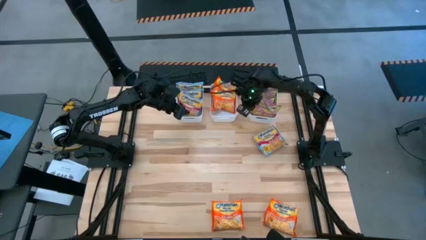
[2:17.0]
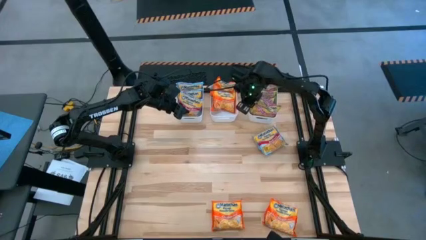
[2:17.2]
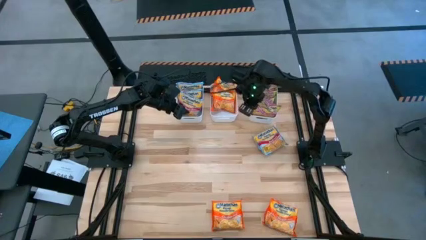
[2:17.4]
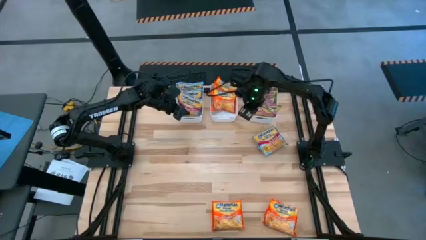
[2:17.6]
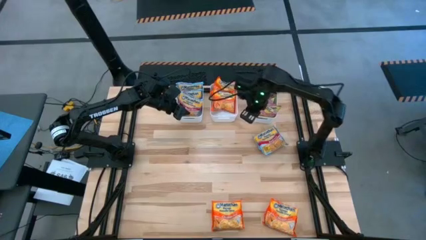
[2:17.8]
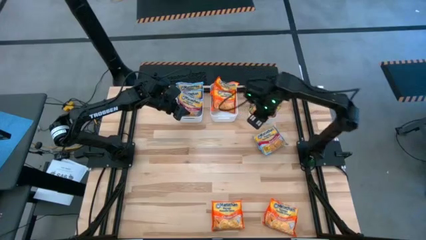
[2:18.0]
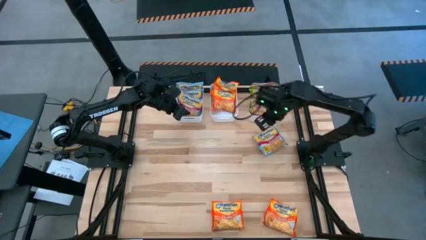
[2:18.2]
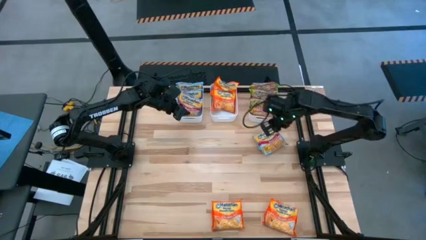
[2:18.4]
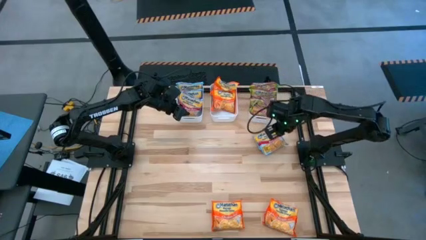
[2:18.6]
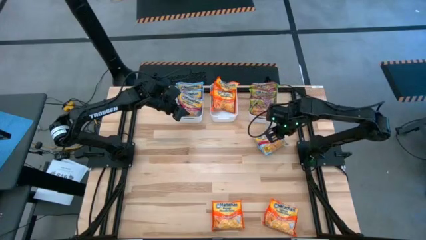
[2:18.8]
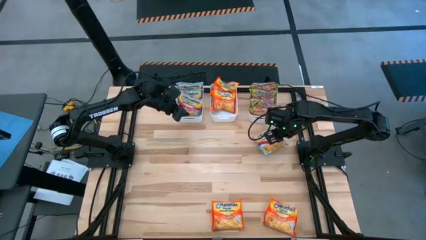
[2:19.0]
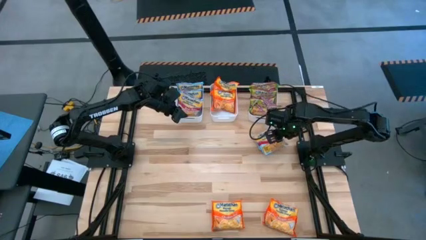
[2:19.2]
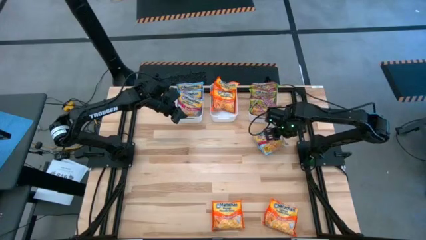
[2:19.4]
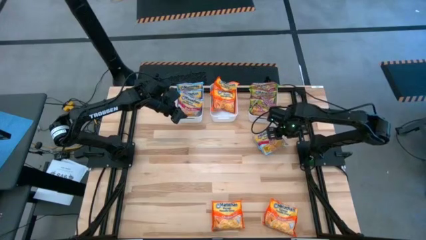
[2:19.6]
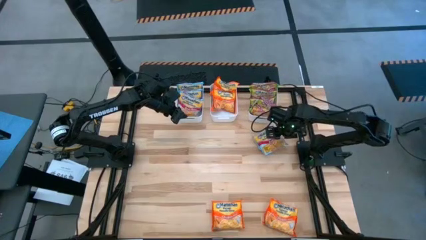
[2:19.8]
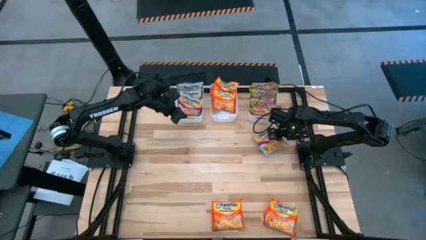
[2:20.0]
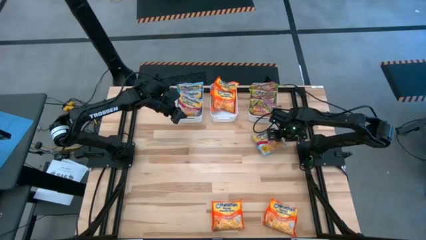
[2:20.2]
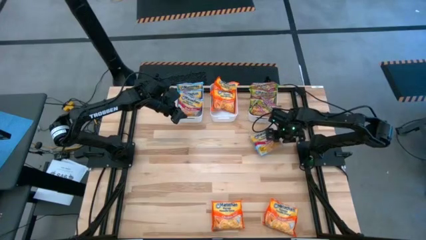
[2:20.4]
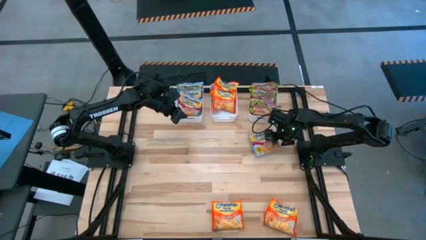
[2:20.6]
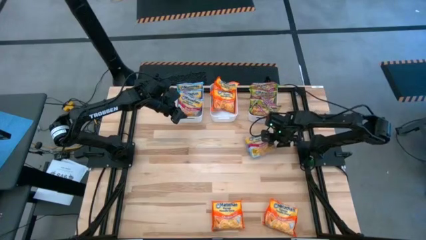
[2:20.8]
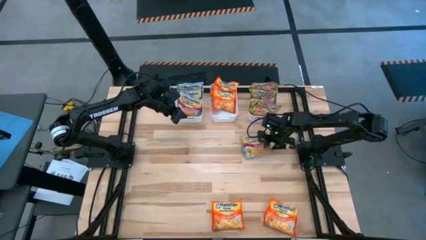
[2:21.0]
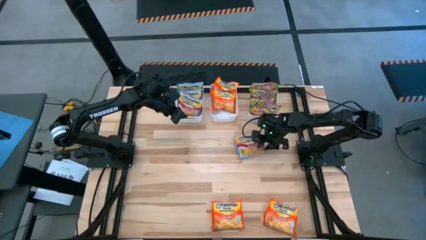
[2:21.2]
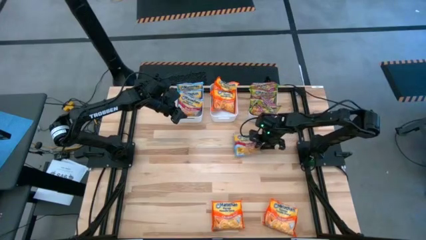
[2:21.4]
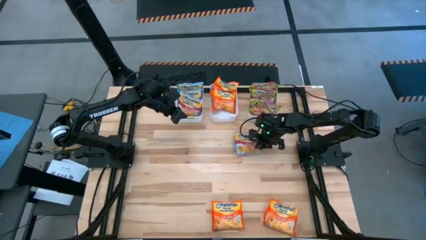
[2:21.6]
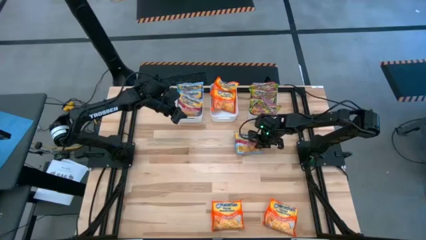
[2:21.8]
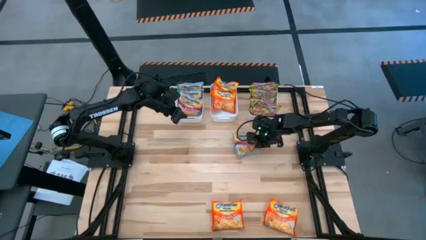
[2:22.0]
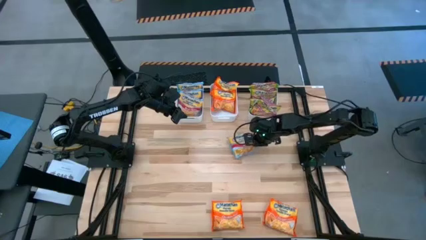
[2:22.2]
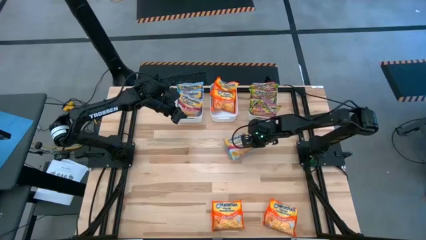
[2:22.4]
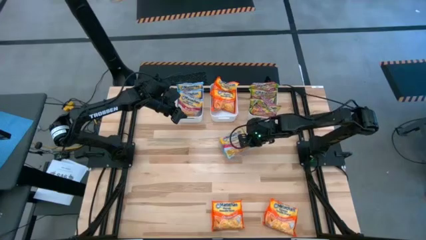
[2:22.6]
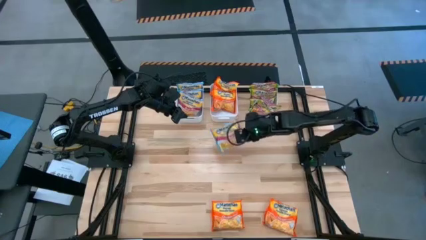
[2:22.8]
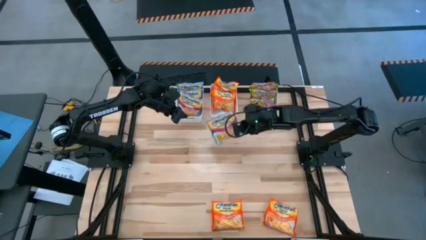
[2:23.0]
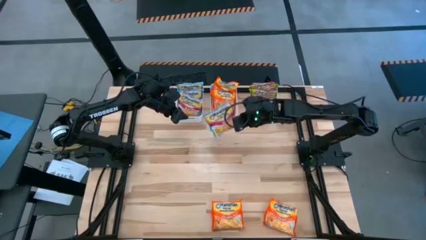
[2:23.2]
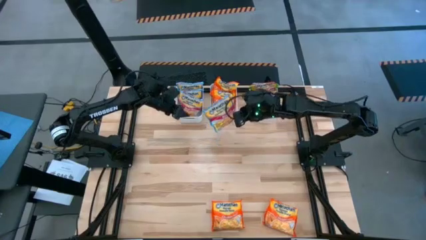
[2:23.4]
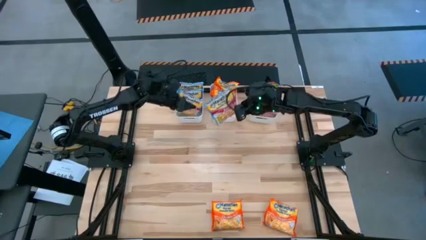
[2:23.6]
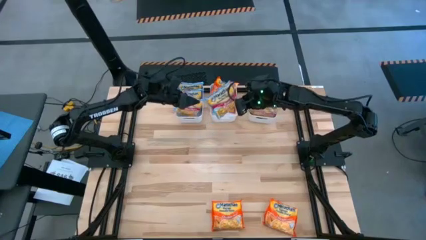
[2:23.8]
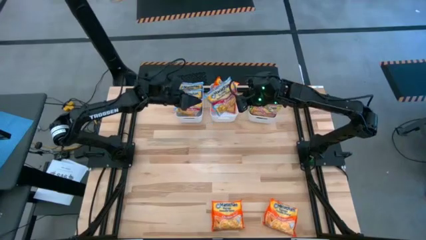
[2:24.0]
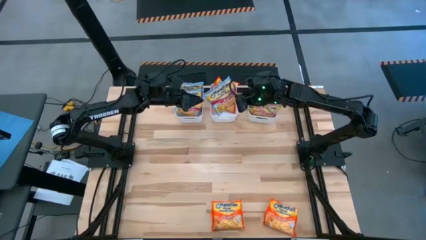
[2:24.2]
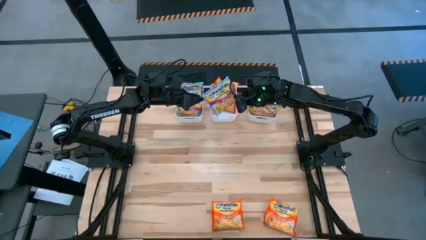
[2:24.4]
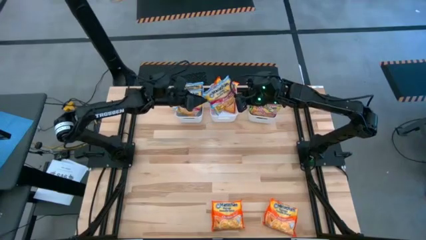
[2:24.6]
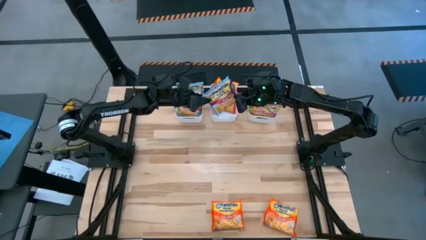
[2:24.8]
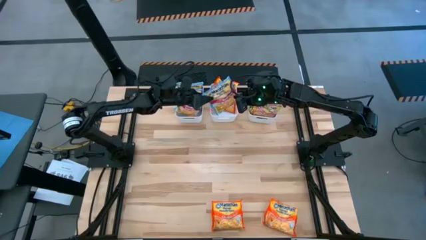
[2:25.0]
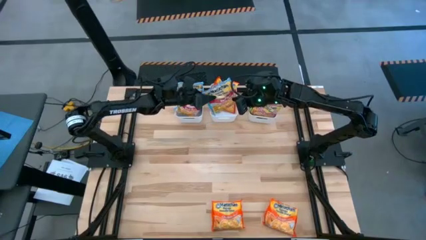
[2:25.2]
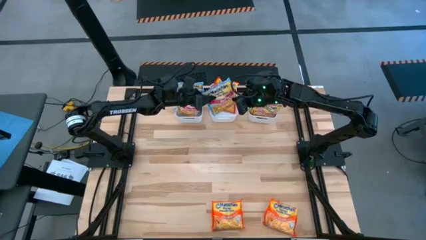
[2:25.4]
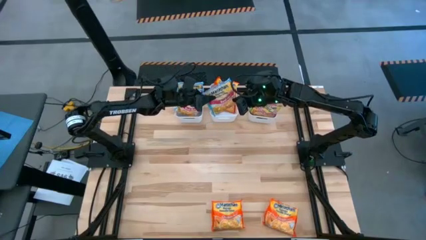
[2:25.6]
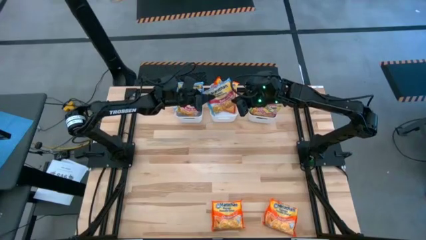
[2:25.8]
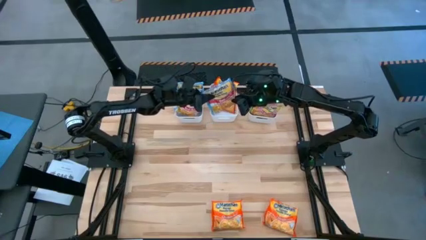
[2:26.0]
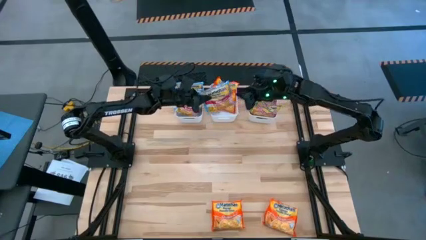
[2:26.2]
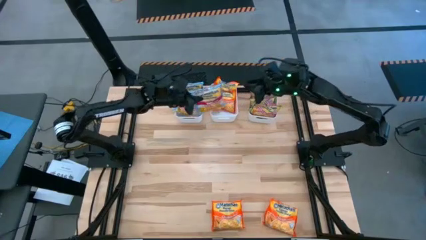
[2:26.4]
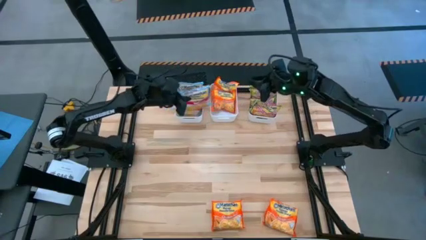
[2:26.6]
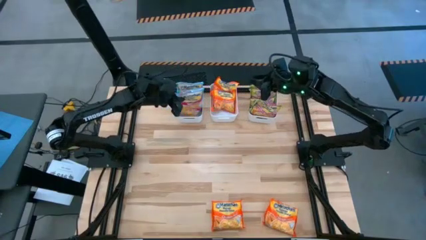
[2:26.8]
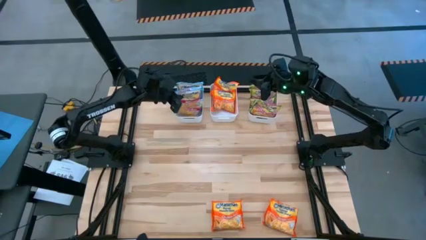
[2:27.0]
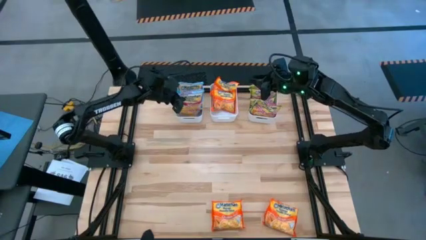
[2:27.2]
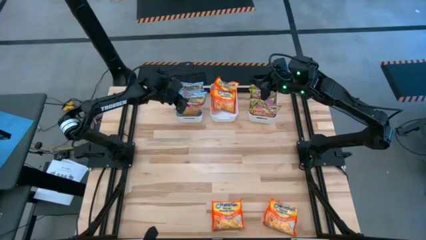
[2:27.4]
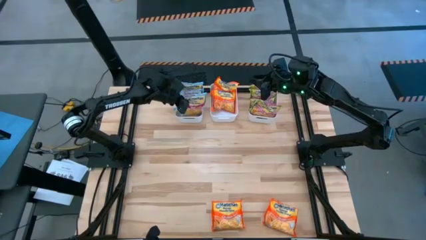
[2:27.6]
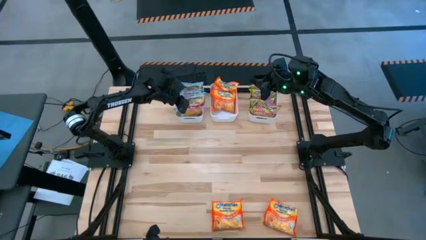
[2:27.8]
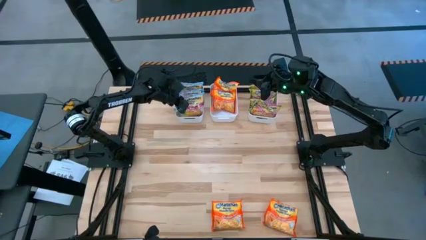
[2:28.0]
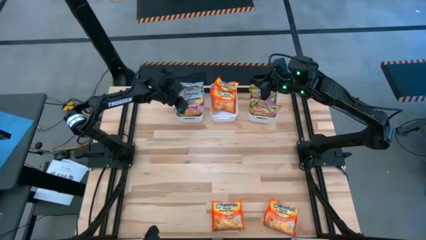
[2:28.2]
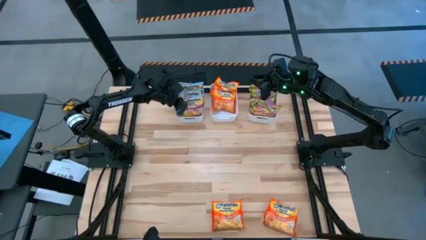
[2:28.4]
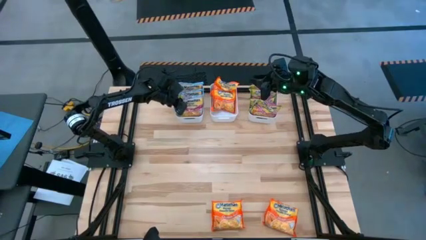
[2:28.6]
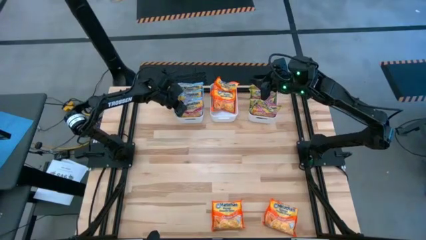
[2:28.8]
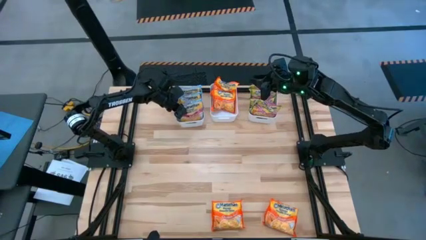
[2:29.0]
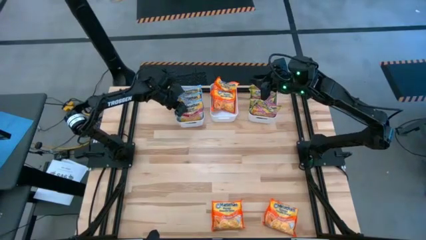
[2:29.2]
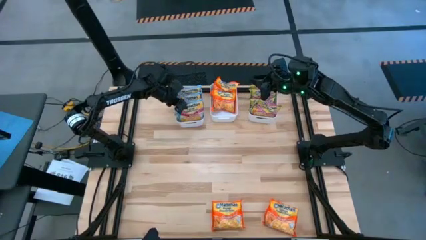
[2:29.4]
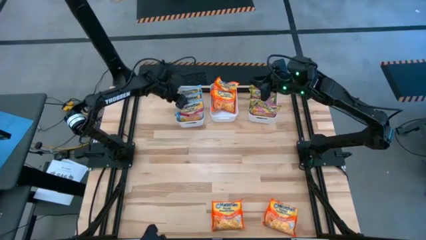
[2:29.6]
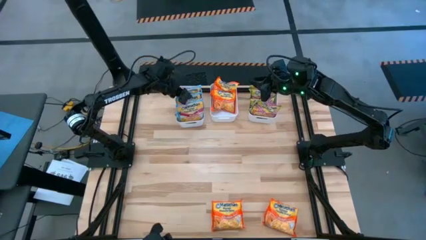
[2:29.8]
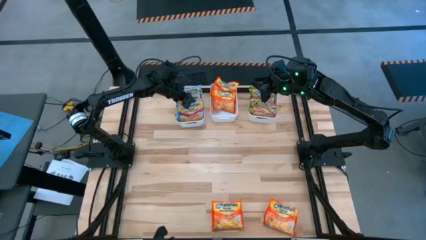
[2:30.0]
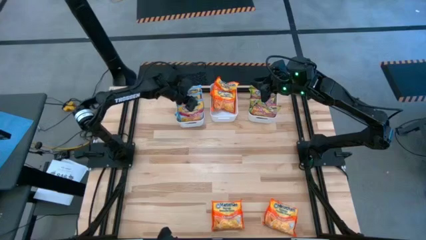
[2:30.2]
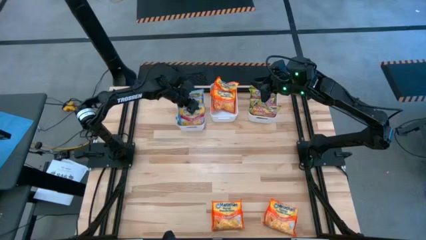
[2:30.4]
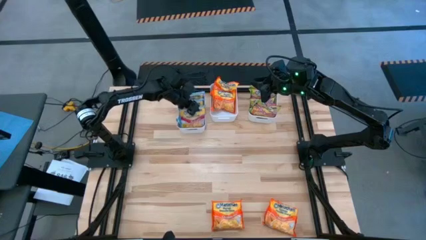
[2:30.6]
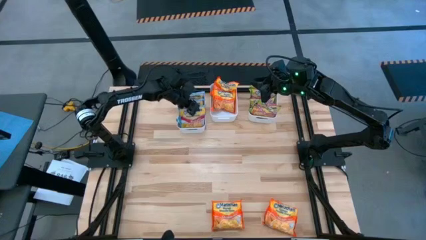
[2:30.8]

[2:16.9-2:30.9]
Task: Sort Maruchan noodles
Put the blue noodle pack into the left white bin

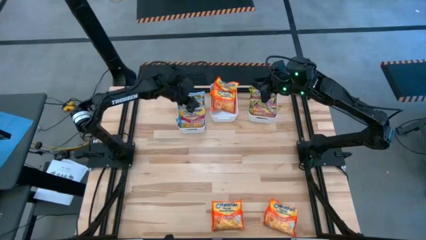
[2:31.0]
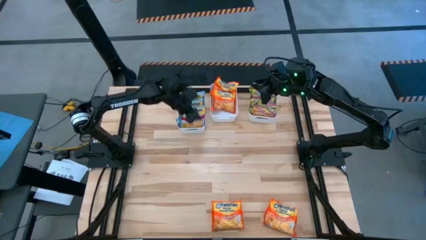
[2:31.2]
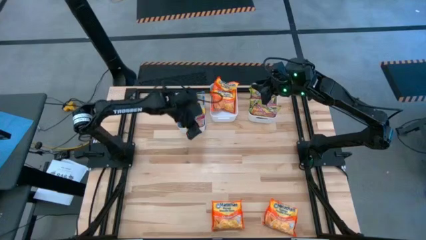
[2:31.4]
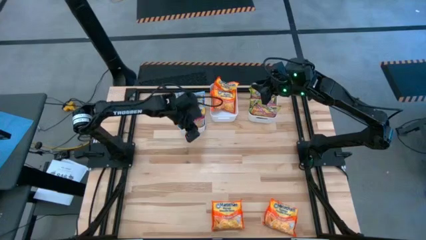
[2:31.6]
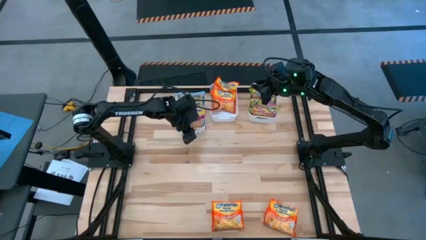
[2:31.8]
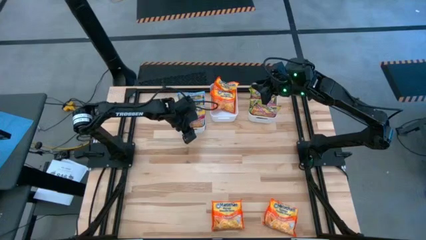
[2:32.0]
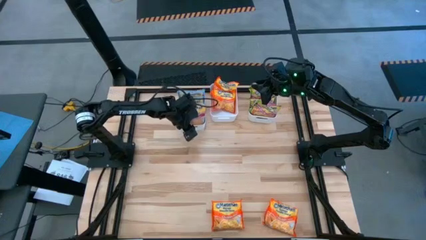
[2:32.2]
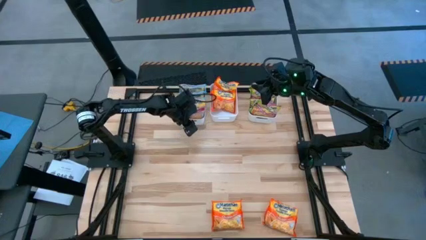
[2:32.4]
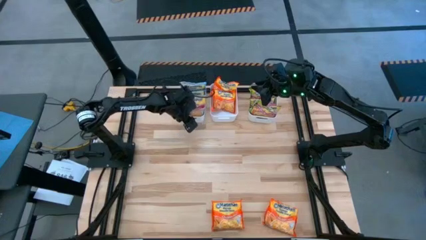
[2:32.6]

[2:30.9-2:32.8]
Adjust the left white bin
